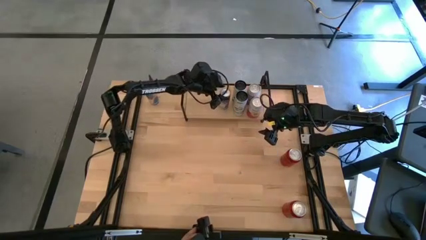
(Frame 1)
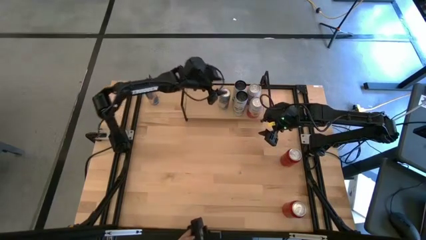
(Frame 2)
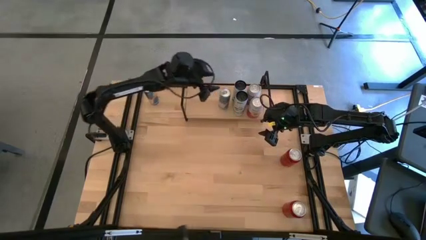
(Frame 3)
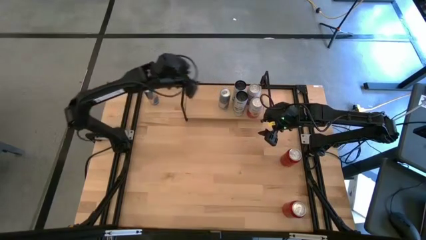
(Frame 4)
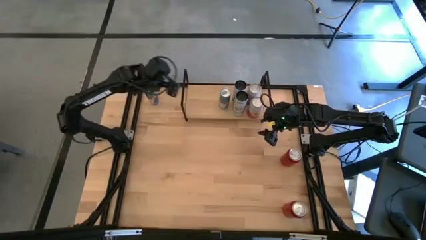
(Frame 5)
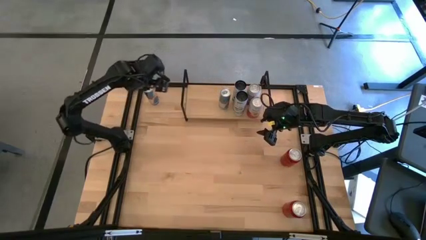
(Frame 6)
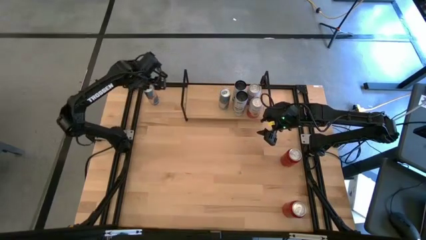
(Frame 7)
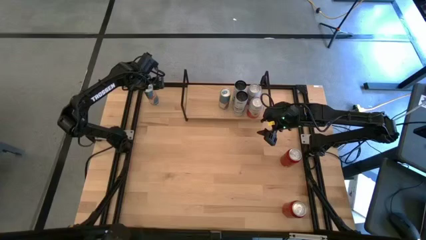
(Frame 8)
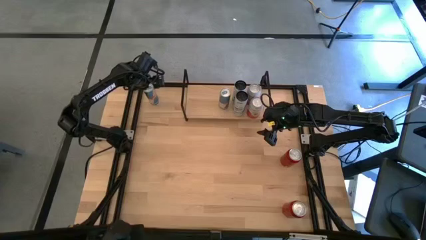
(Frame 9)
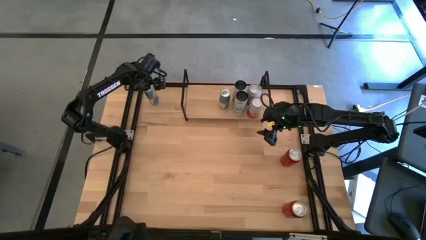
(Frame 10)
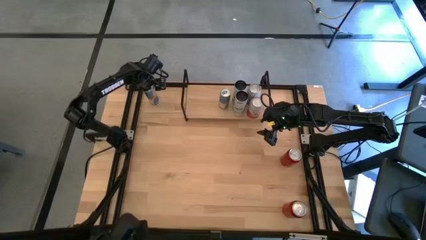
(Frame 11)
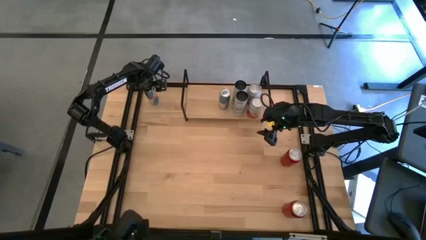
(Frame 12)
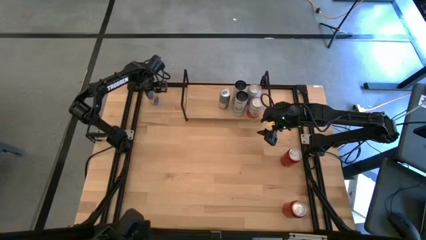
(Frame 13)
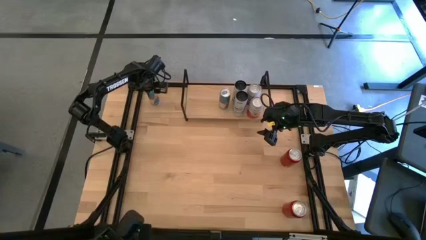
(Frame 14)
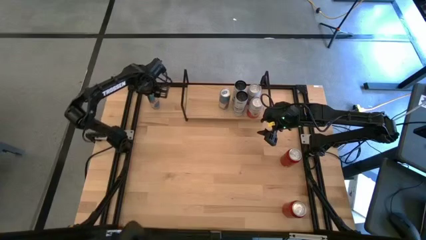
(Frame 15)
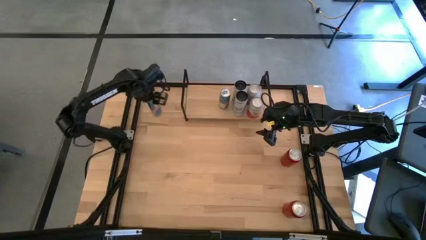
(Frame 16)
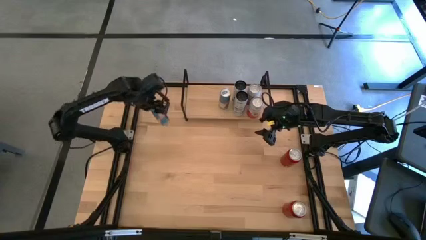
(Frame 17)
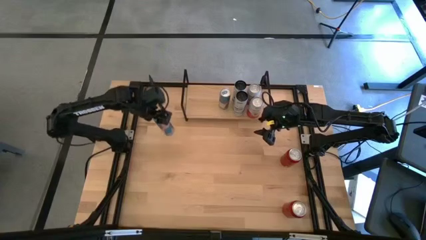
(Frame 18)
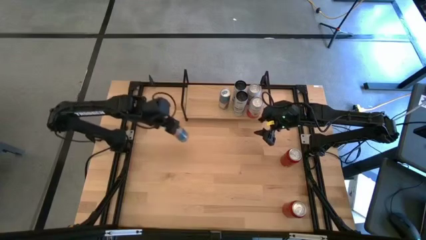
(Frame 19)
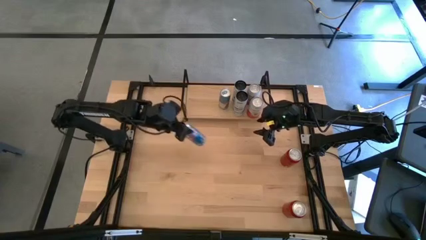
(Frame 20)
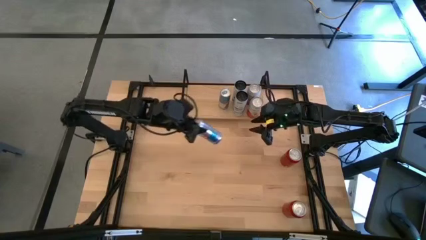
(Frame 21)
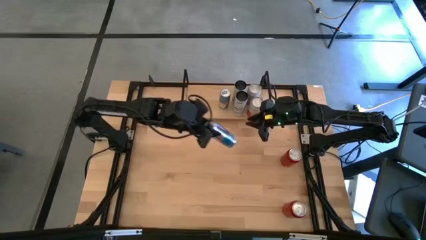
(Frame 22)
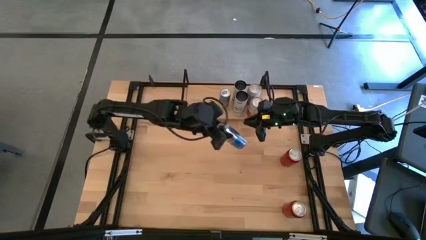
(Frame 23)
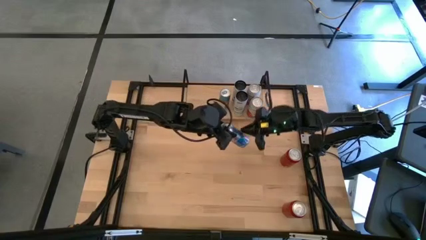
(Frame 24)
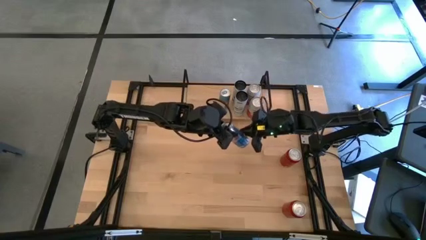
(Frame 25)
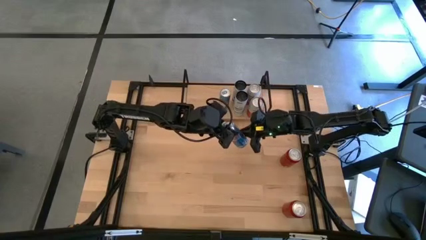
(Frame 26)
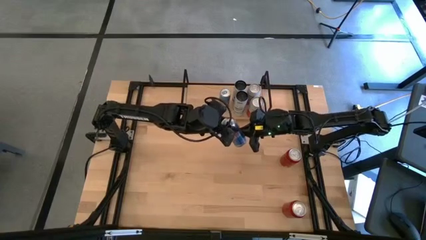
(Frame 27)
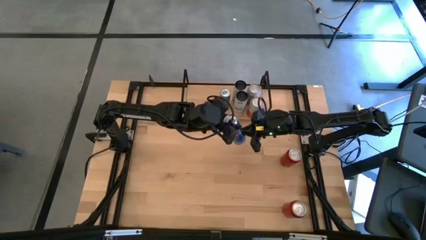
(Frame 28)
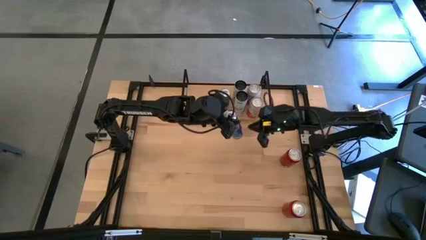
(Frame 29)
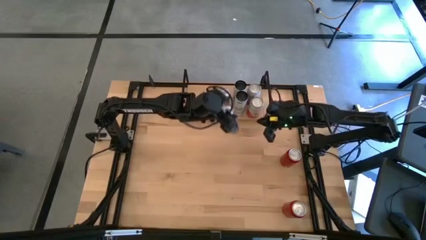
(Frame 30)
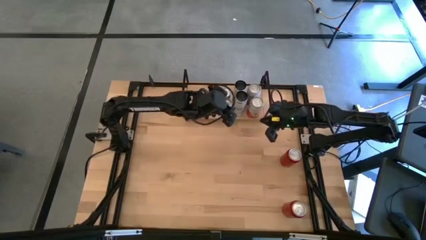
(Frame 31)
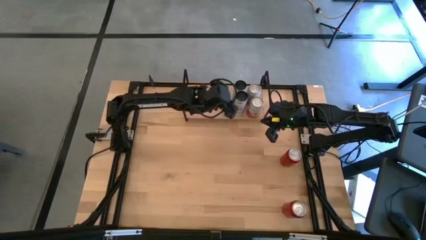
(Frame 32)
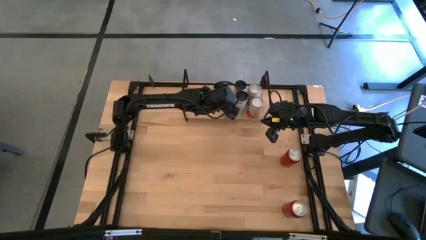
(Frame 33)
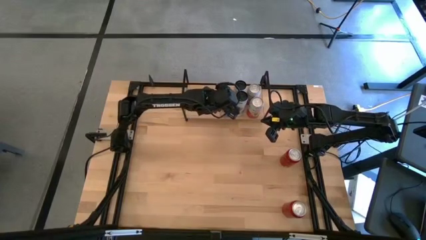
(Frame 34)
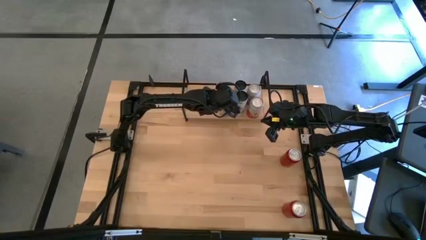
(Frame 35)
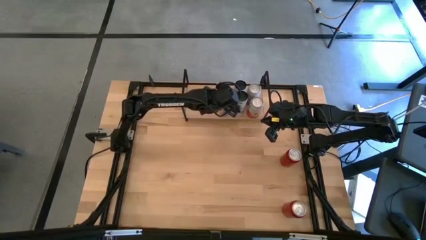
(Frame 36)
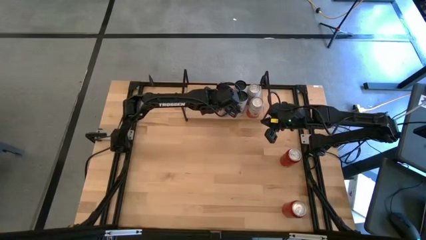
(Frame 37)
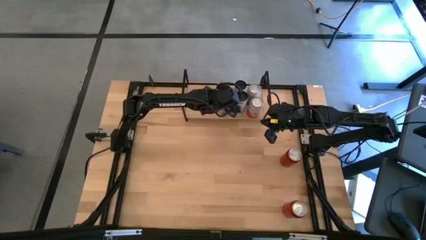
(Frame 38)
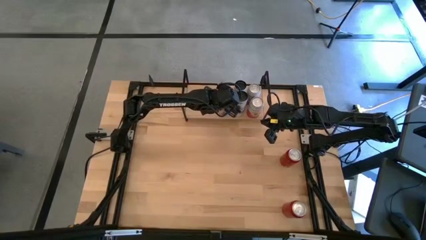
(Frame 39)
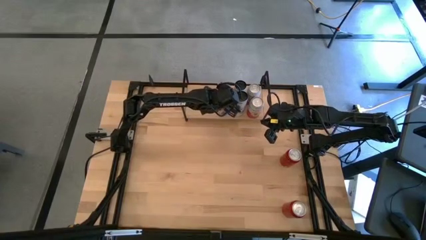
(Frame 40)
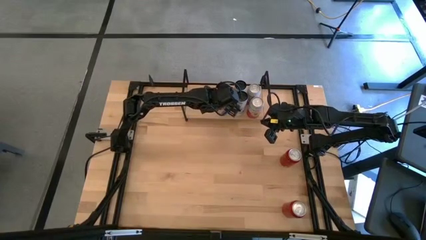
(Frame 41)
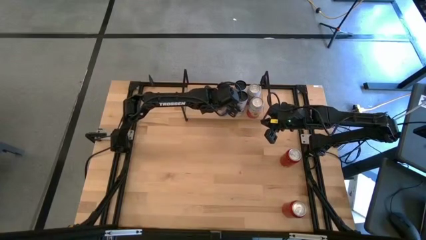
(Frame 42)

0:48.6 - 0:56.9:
Task: Place canned beverage on shelf
Put the blue soda can on the shelf

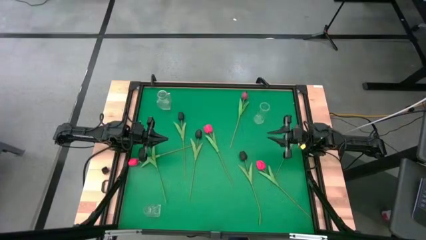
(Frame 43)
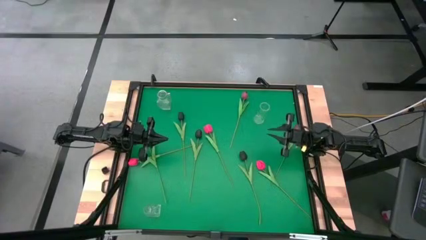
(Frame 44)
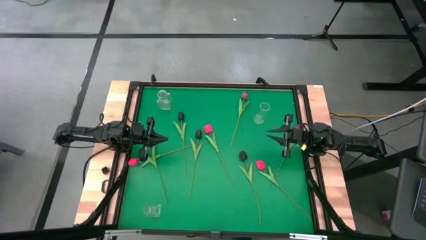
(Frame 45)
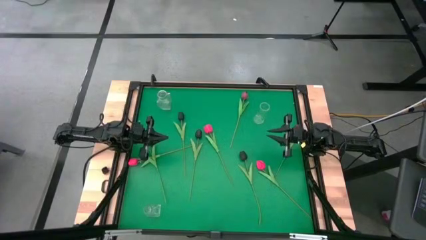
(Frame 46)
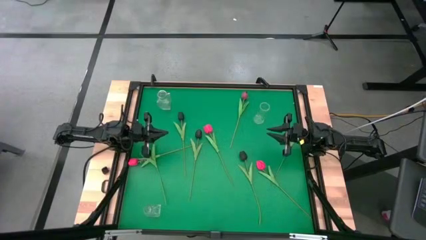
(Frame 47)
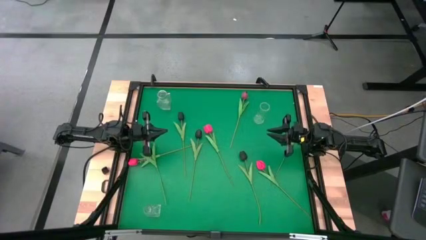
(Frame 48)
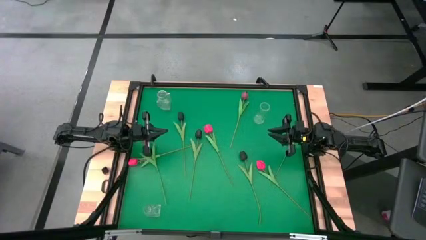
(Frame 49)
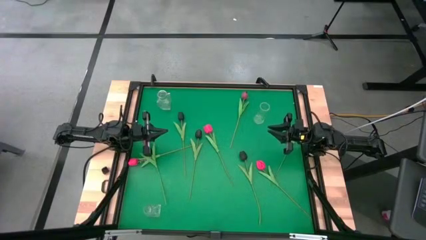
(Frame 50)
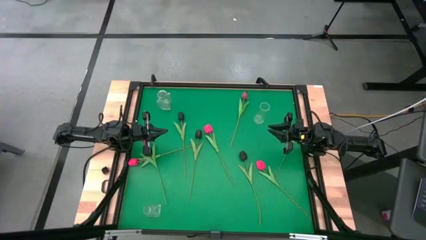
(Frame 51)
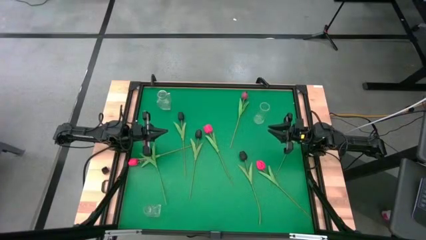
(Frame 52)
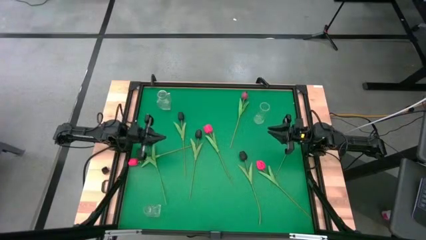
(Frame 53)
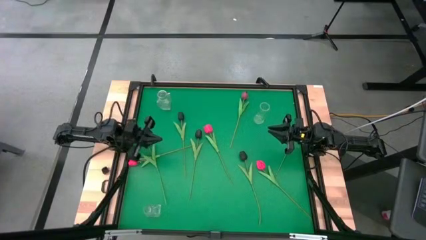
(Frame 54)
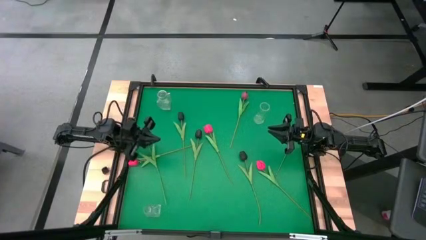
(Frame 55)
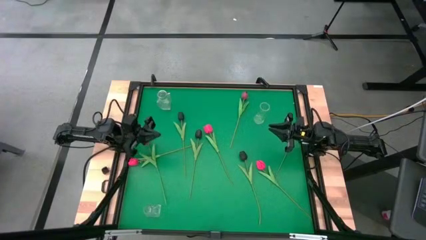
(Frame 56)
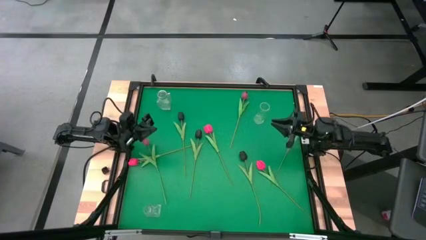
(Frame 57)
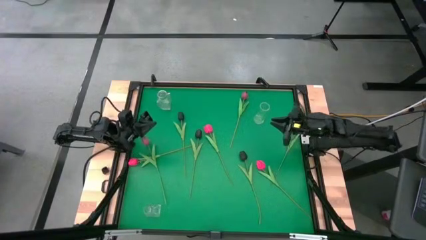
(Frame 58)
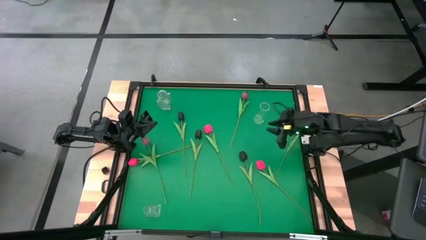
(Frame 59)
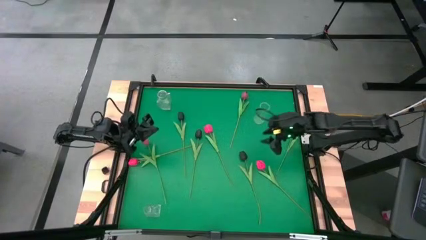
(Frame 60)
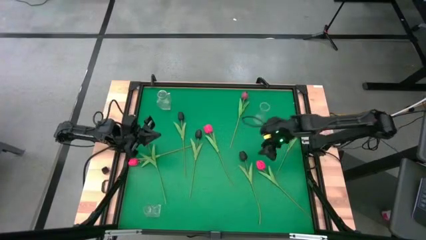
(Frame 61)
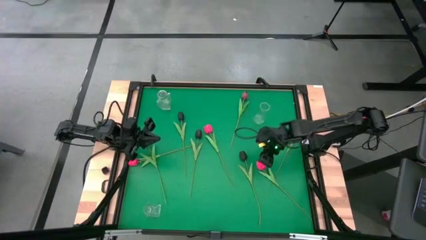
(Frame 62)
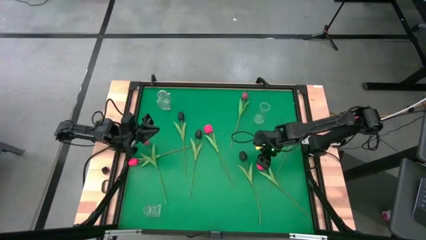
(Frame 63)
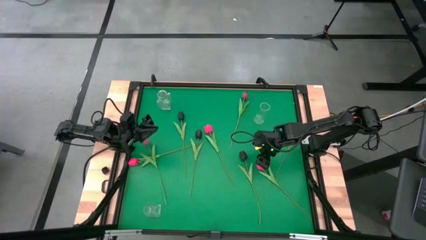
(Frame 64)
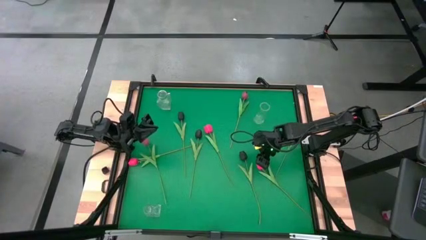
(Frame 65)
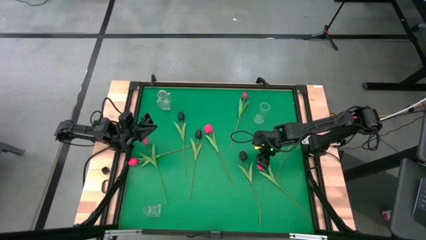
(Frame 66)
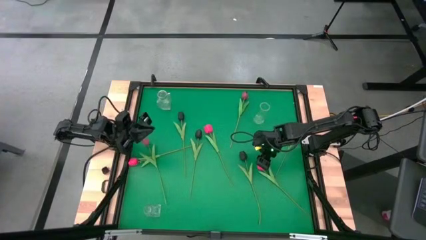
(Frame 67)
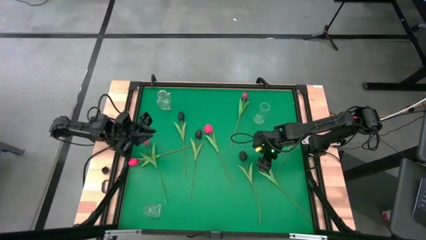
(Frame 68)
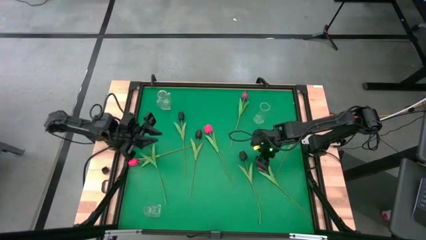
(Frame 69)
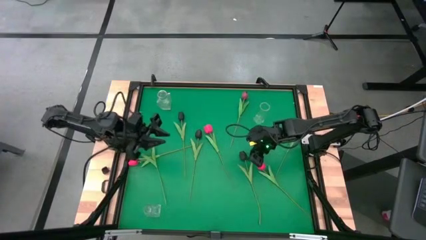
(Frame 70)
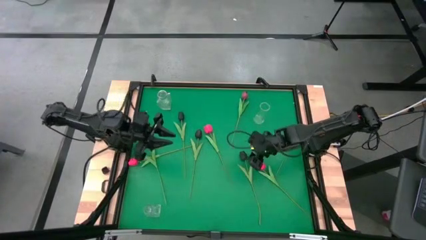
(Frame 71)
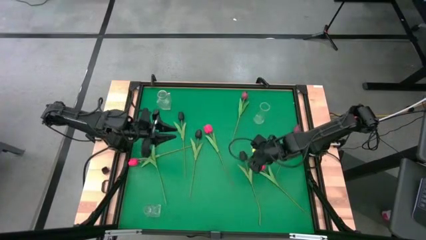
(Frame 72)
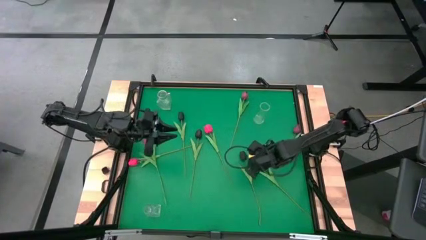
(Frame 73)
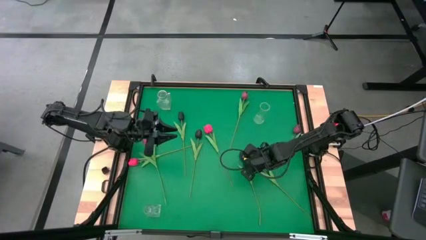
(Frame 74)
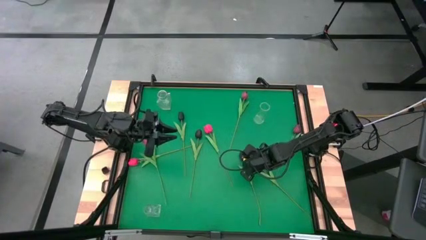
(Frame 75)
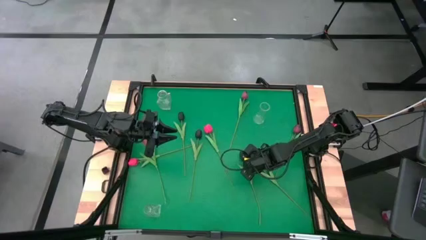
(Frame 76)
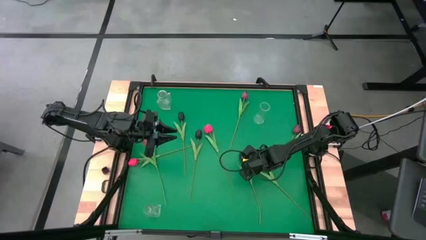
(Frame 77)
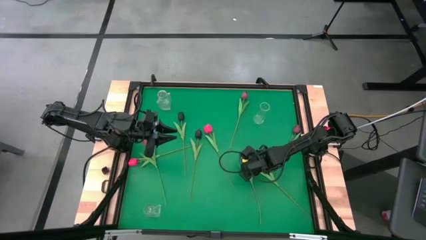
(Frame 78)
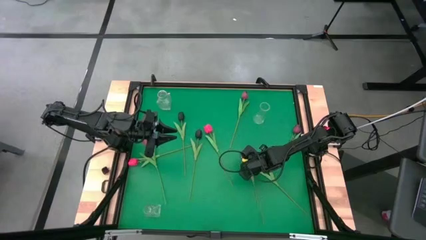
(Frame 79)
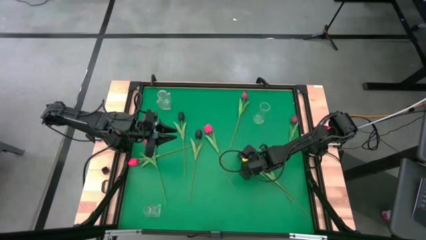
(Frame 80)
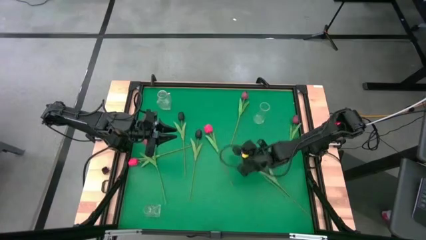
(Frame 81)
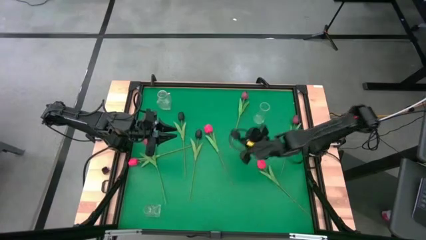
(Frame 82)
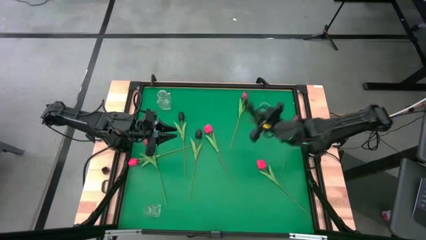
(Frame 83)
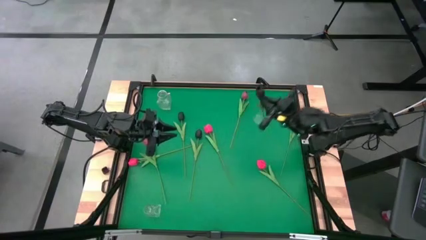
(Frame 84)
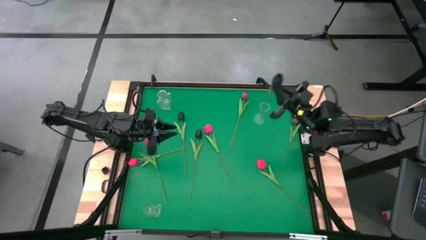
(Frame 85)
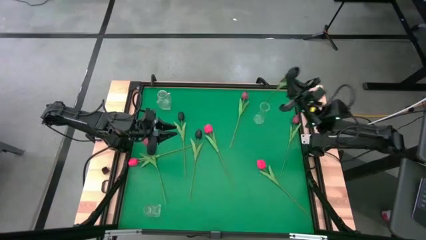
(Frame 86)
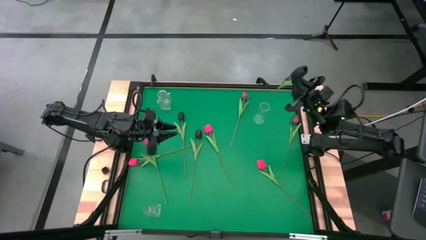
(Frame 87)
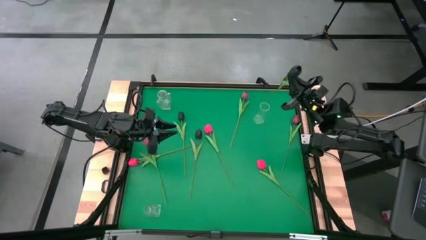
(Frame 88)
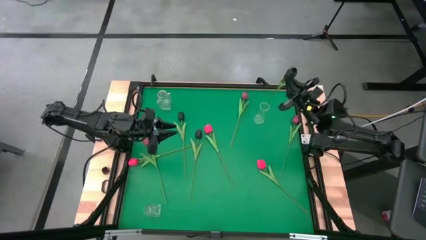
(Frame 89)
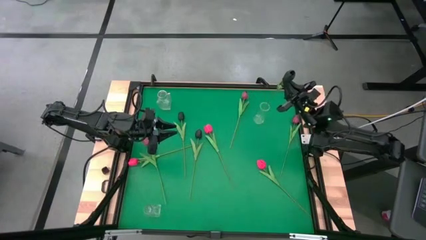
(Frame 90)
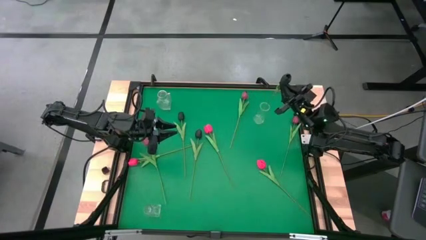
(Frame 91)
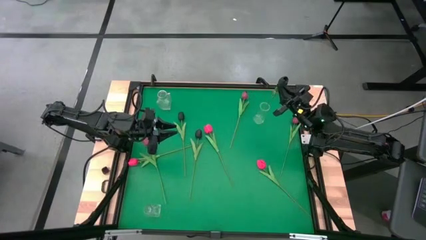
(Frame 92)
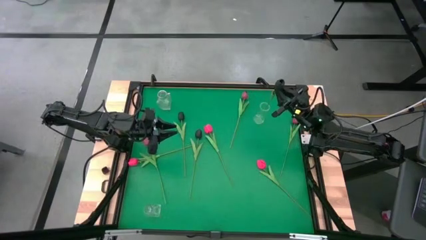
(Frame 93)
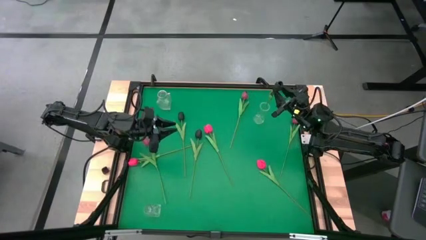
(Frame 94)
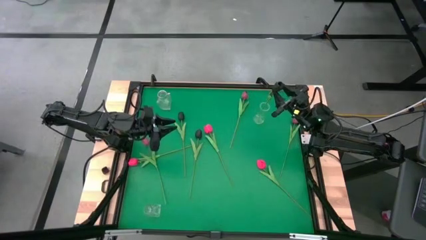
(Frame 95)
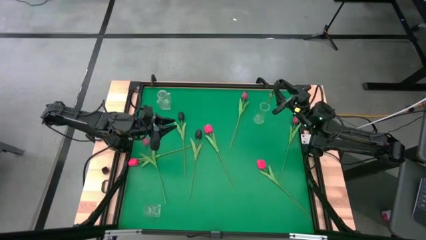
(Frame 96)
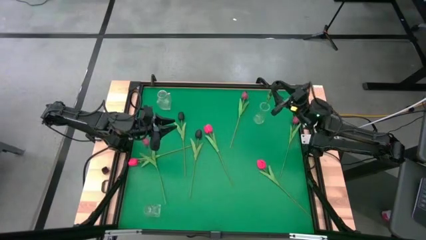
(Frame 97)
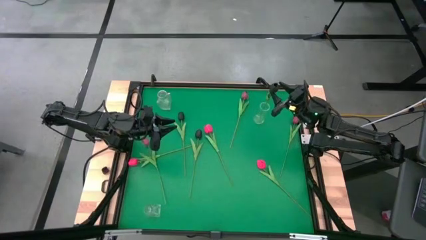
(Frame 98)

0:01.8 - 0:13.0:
Task: Sort flowers into vase by color
Put the bottom black flower into the top right transparent vase
